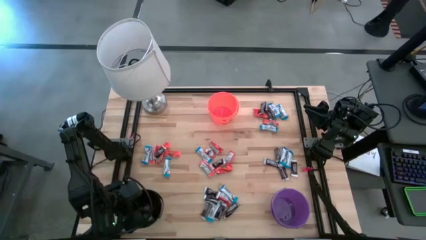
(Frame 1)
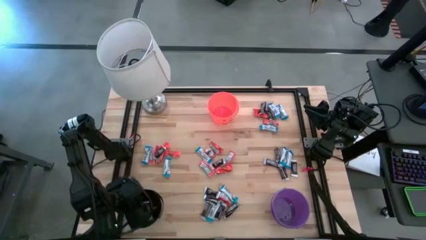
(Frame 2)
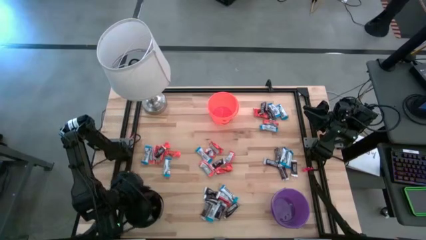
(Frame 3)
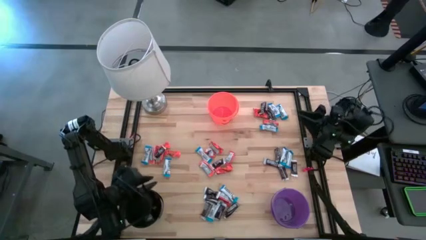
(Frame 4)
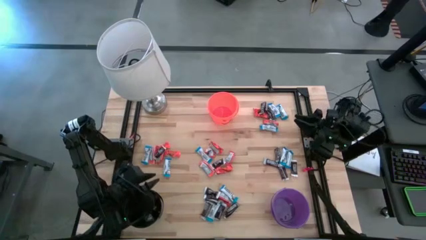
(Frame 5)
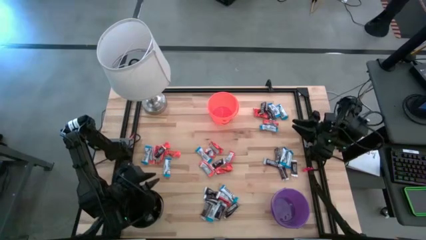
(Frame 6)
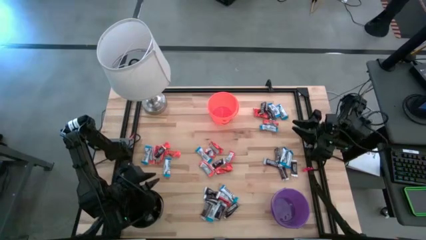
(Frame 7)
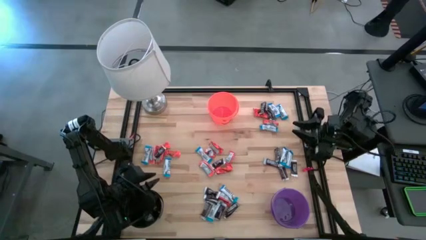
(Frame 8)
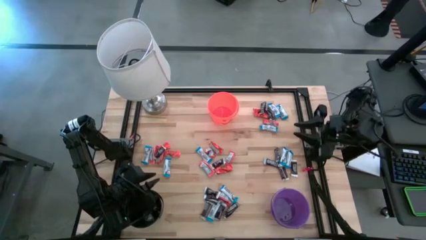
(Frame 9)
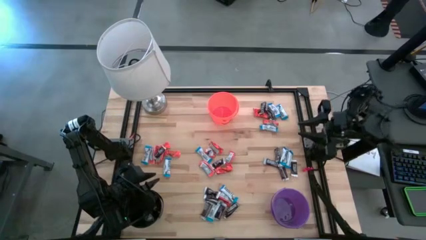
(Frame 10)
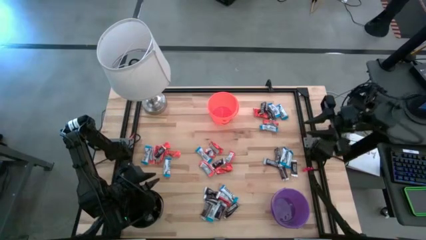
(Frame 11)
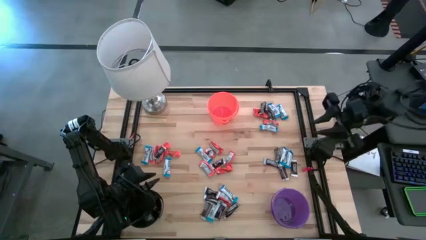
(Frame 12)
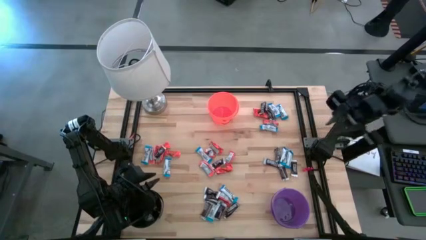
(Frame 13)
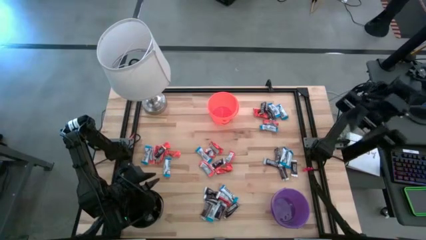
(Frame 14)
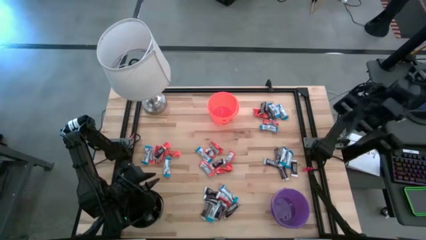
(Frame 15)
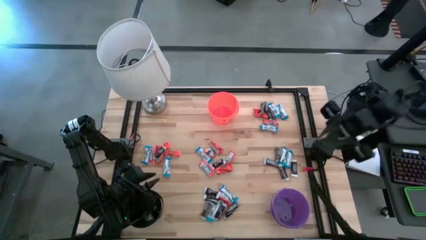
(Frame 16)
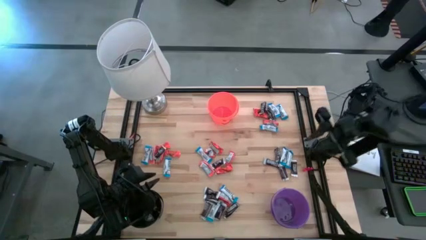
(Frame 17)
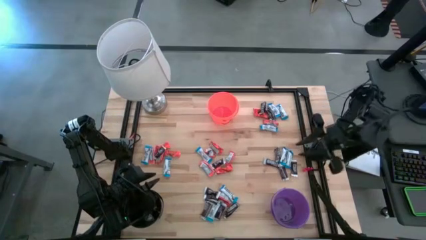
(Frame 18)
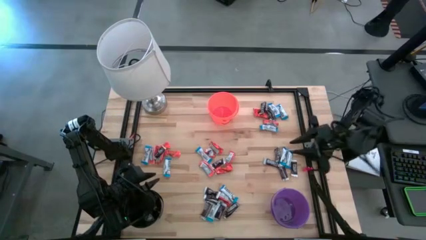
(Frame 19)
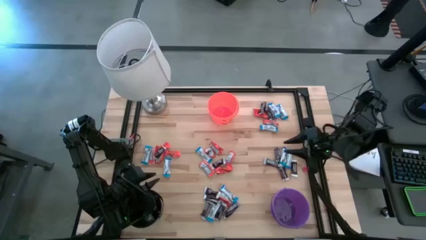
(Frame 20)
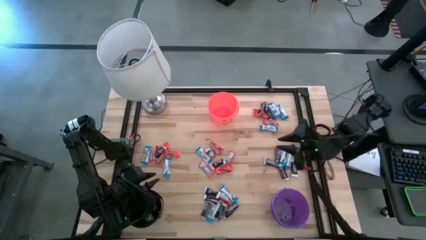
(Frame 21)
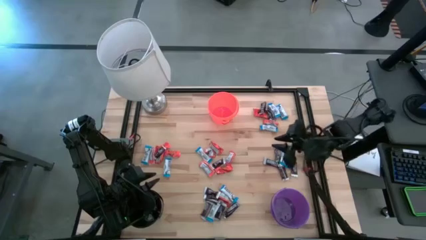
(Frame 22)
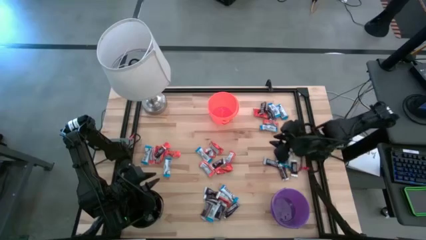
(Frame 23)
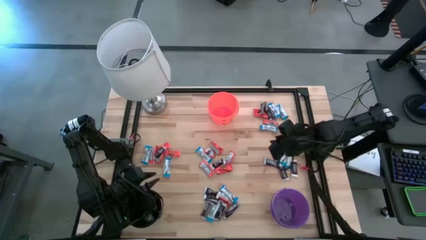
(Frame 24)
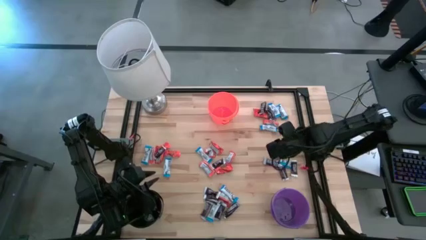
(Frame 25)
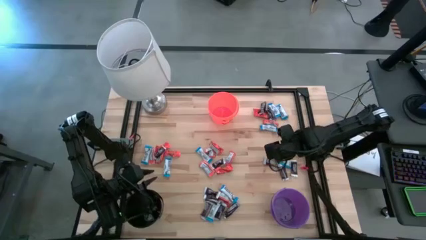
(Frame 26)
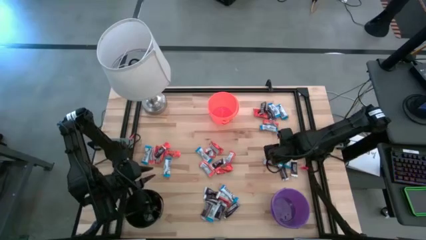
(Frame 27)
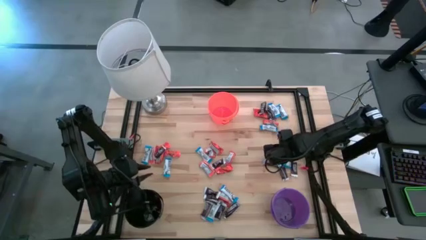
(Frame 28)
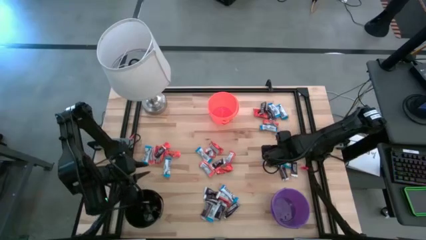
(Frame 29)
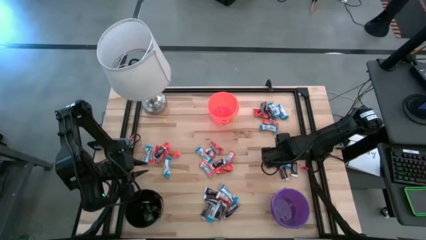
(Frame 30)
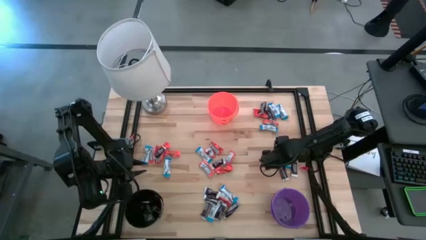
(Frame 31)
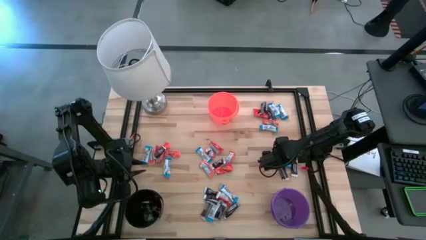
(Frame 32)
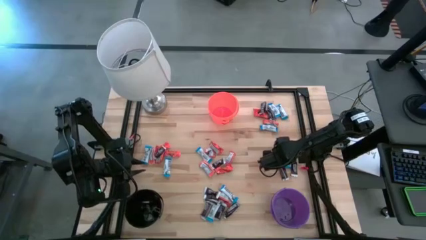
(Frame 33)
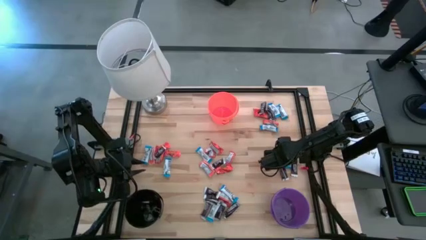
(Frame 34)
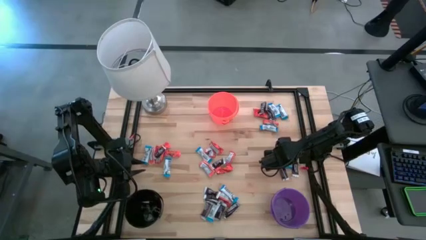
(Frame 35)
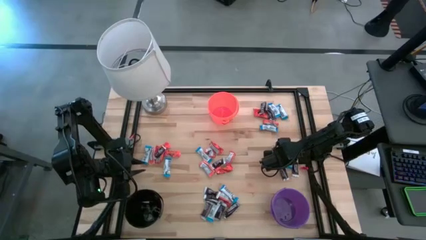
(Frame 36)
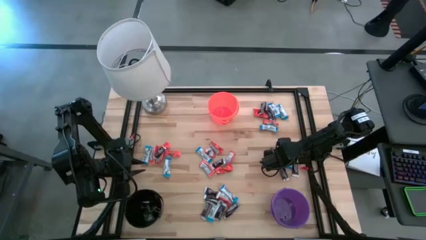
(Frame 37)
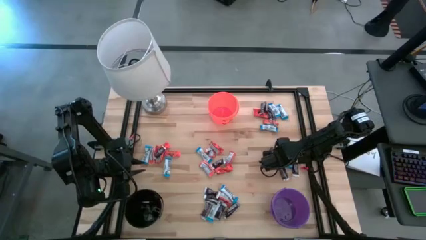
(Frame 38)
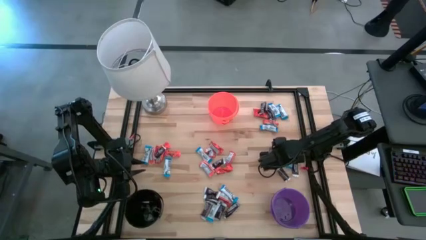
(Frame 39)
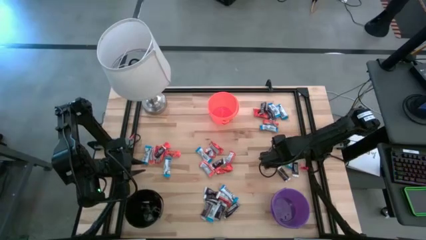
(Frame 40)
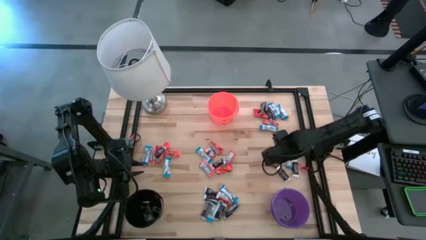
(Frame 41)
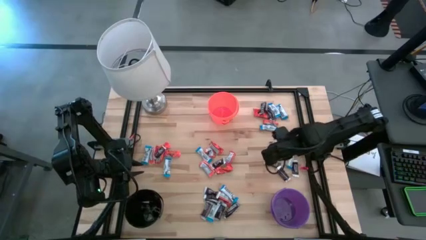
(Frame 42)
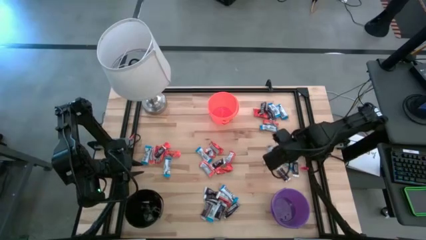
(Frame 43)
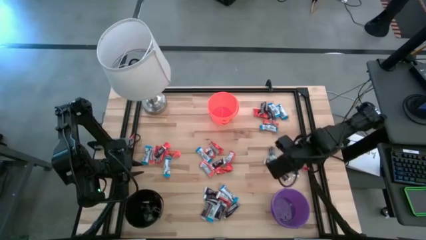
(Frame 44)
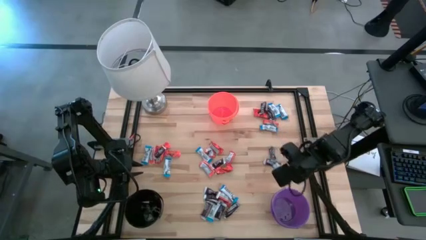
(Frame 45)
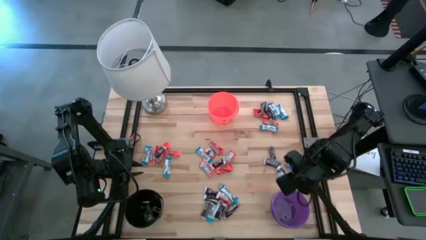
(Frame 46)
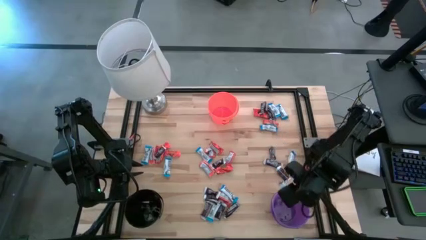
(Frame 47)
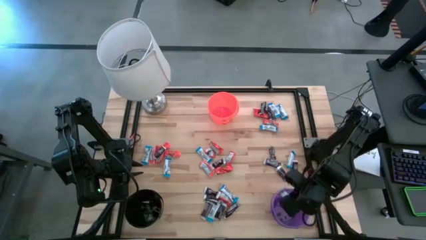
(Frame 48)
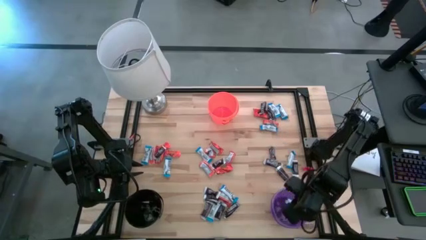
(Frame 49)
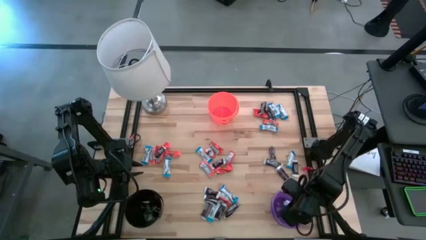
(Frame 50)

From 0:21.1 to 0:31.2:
Task: Organize candy in baskets
Put the white chocolate into the purple bucket

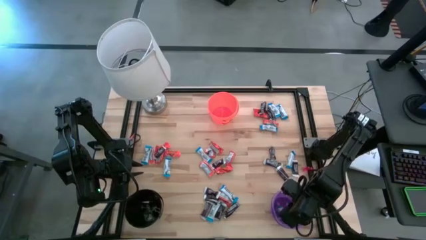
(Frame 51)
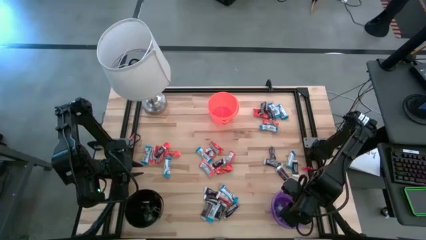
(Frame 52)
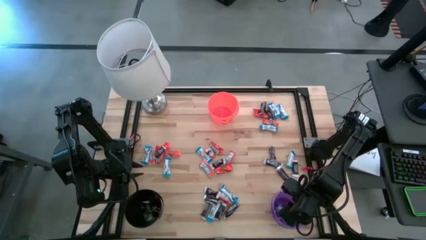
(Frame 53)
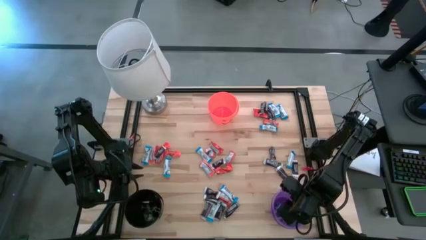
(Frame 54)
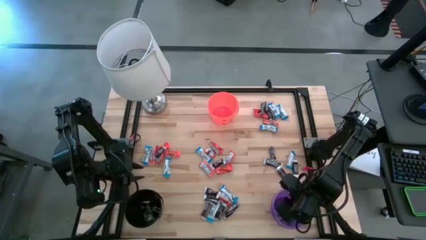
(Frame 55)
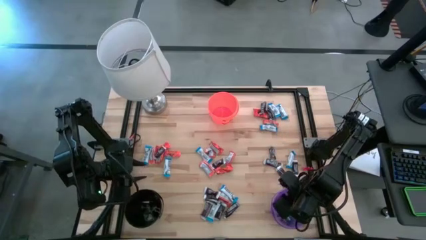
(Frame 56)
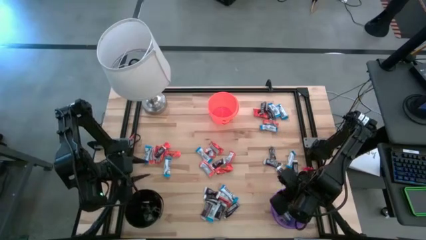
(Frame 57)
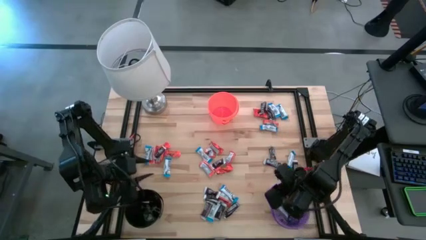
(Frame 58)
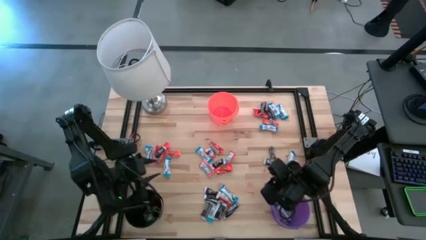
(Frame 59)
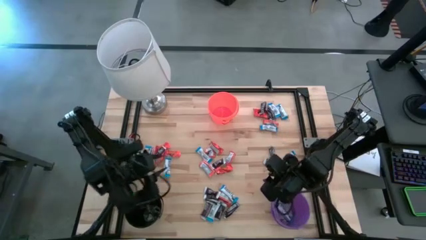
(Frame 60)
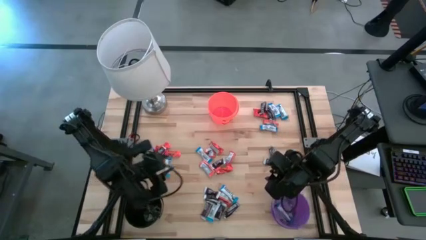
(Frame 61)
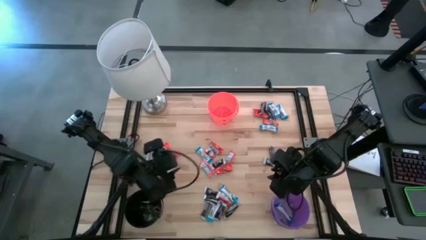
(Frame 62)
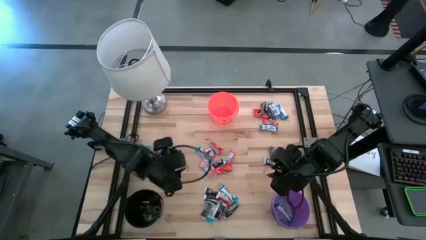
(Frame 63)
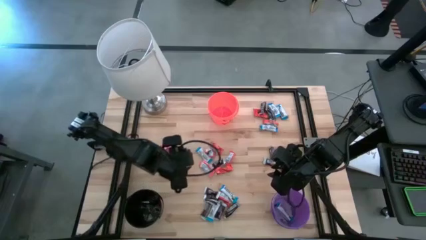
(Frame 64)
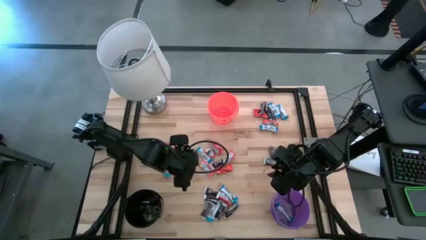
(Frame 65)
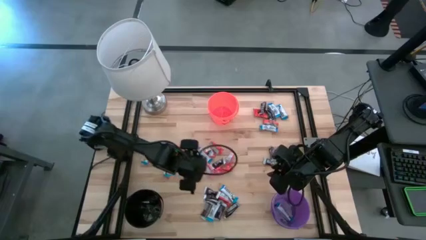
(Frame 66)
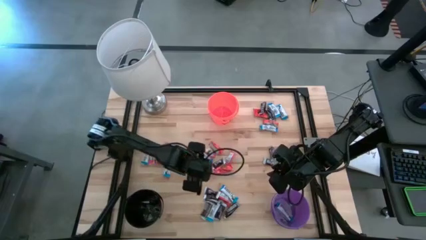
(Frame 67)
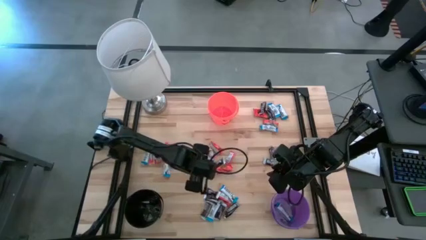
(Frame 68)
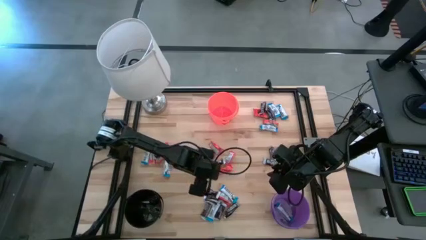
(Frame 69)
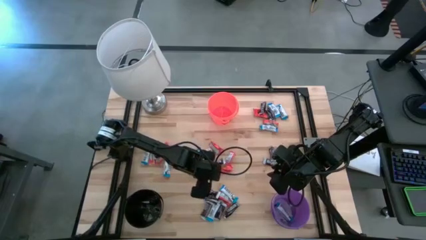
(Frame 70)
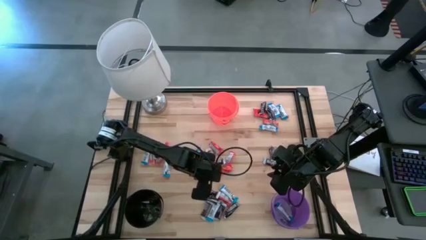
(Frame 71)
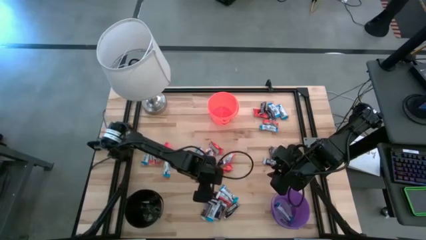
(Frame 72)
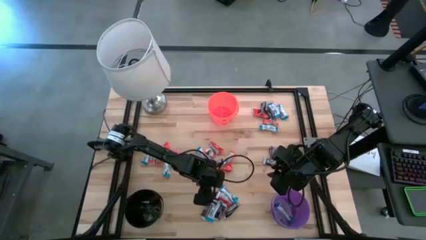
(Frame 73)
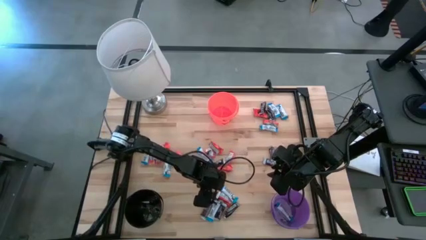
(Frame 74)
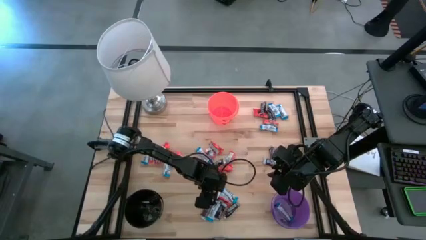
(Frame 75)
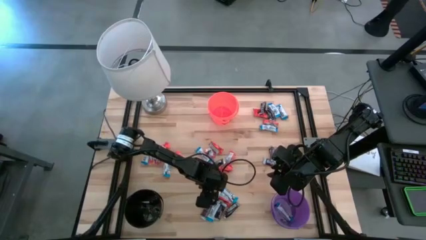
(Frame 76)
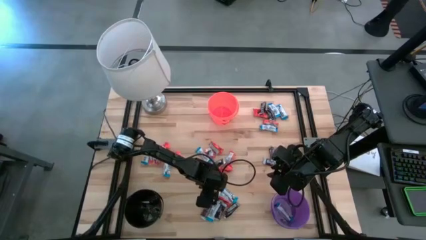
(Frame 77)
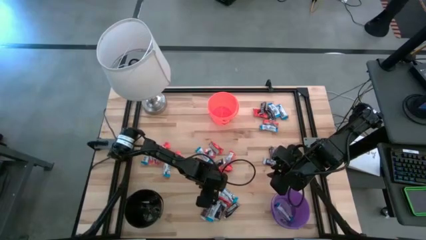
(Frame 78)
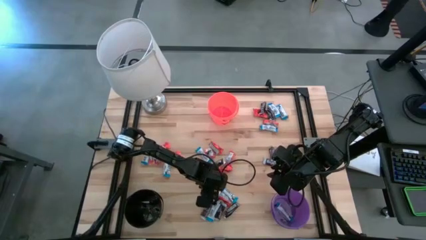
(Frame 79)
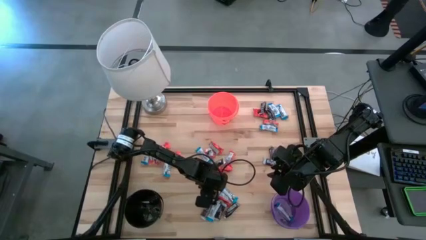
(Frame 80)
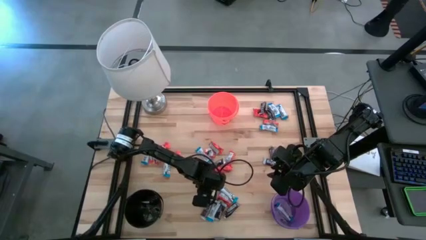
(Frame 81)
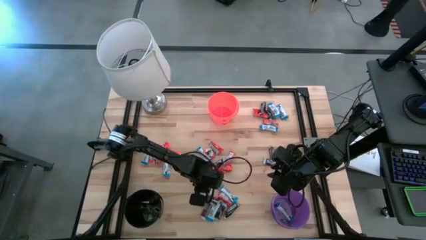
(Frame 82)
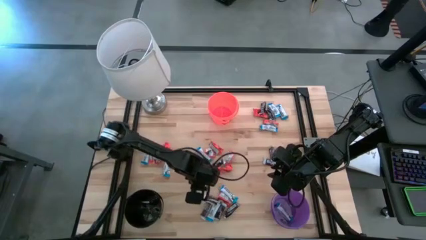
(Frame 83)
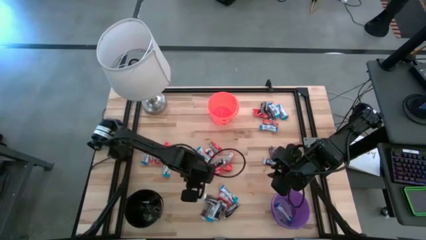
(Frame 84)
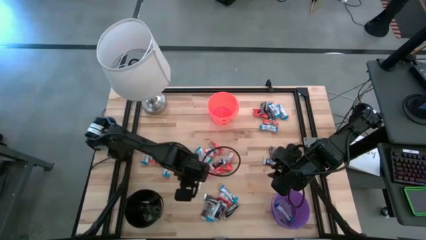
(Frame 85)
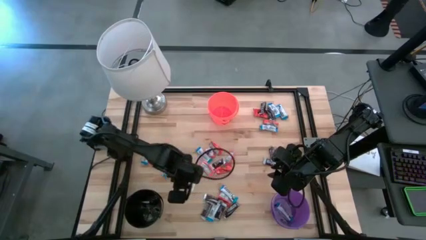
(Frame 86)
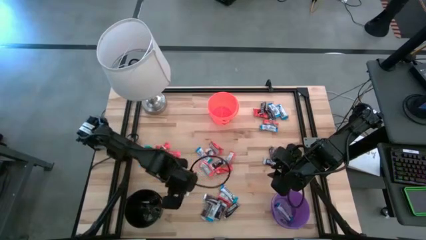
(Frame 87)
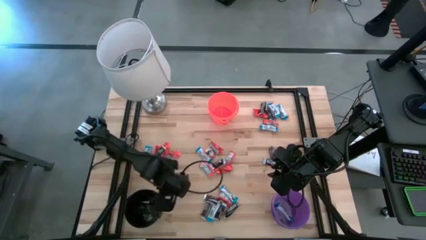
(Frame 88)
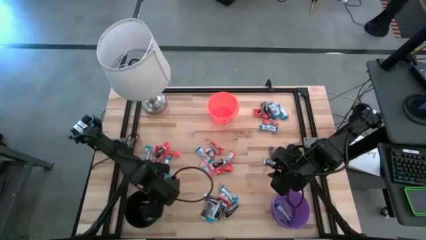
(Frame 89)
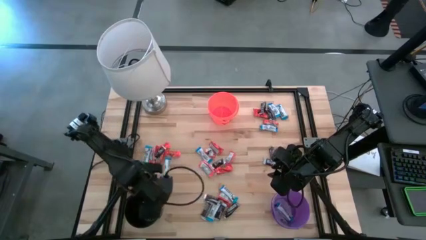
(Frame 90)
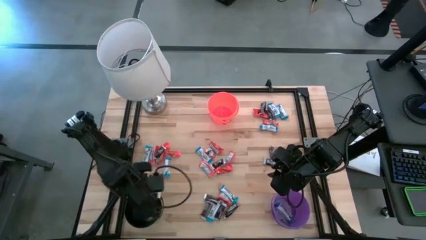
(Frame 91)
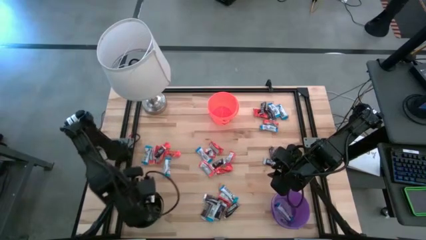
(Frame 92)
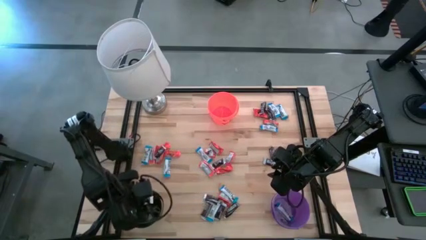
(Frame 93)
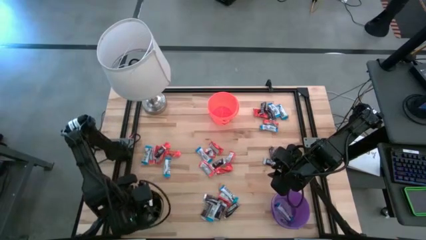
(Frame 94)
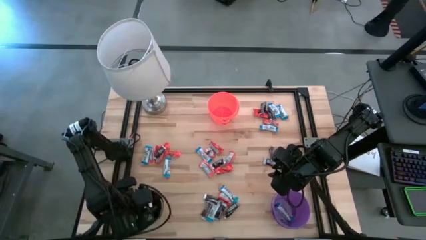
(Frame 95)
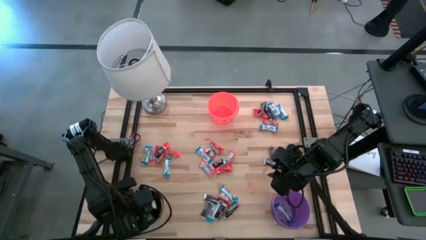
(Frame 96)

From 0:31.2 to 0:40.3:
Put the brown chocolate into the black bucket
